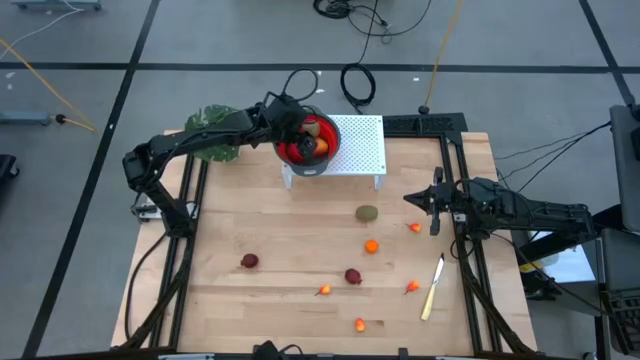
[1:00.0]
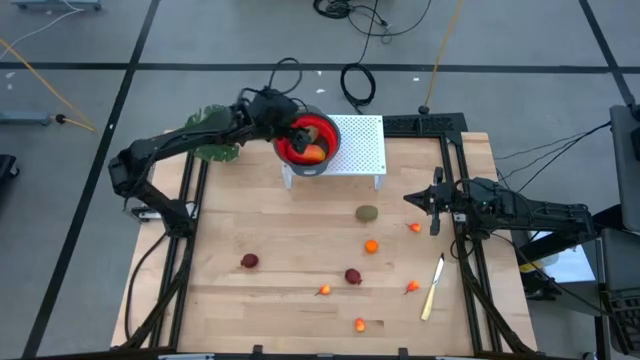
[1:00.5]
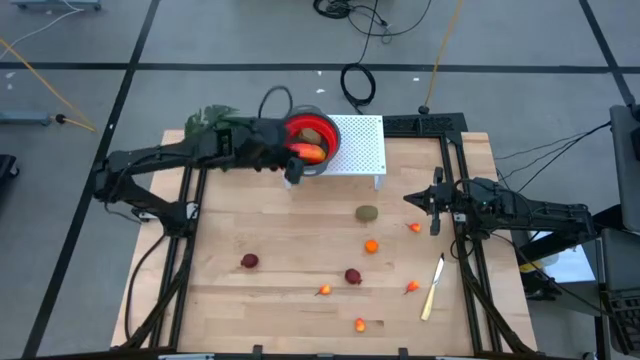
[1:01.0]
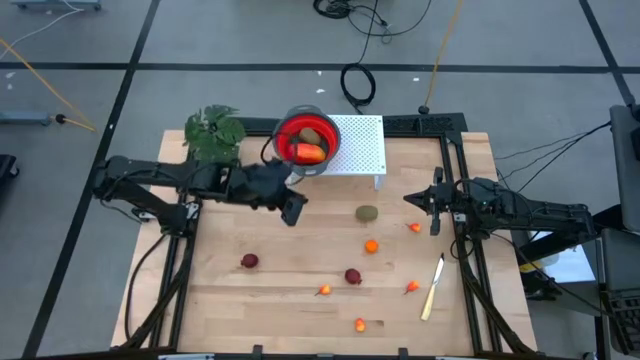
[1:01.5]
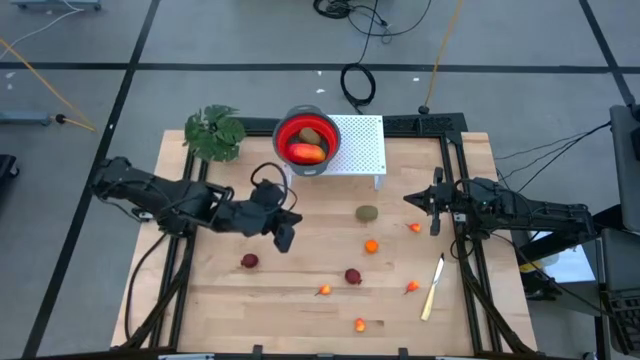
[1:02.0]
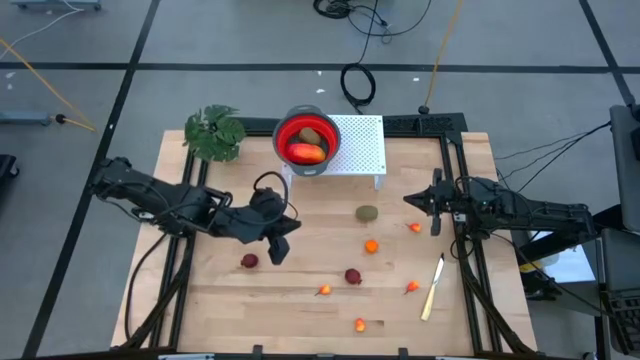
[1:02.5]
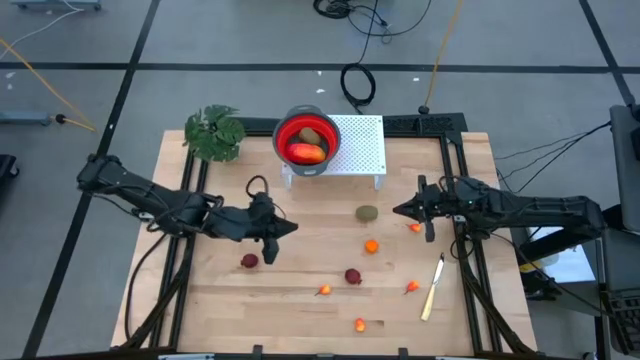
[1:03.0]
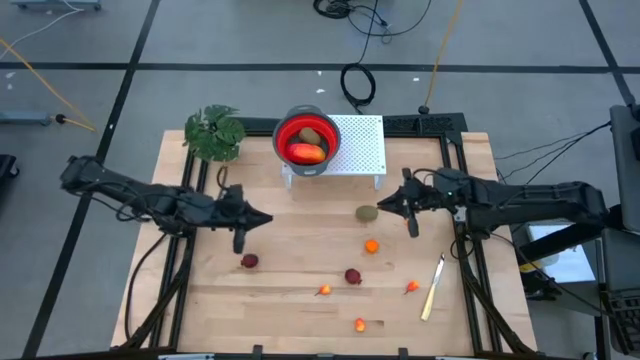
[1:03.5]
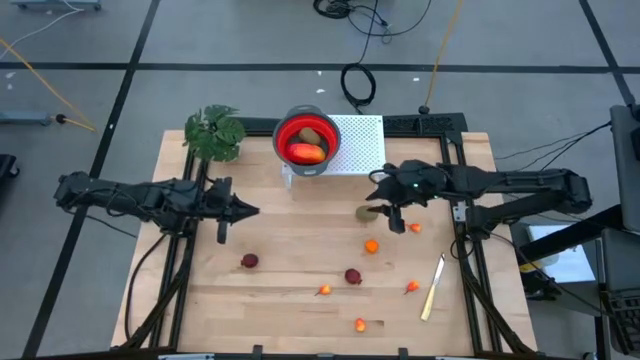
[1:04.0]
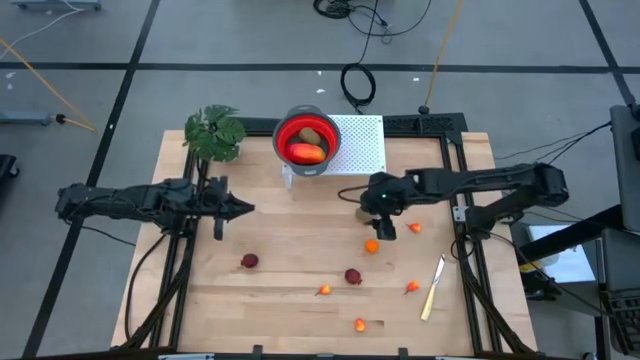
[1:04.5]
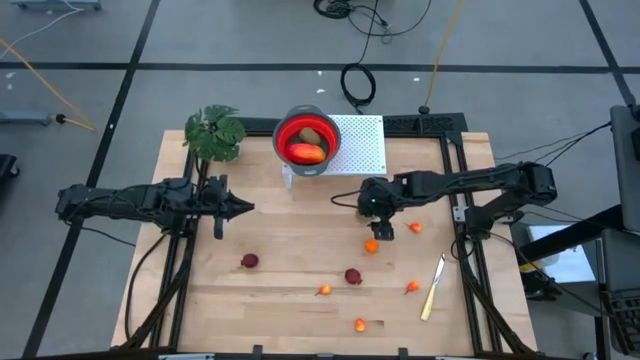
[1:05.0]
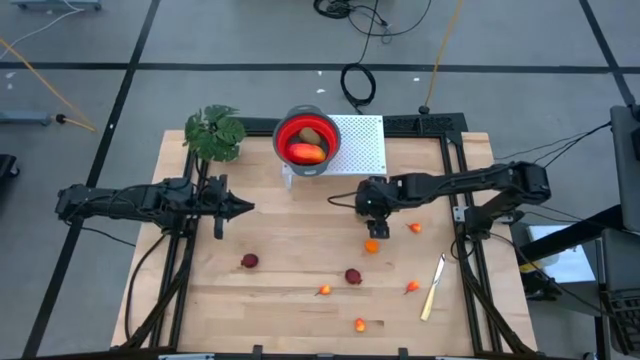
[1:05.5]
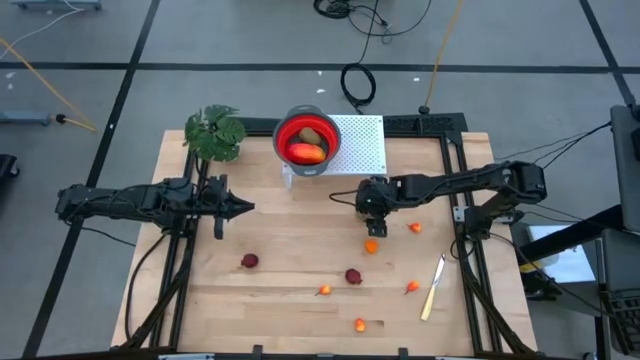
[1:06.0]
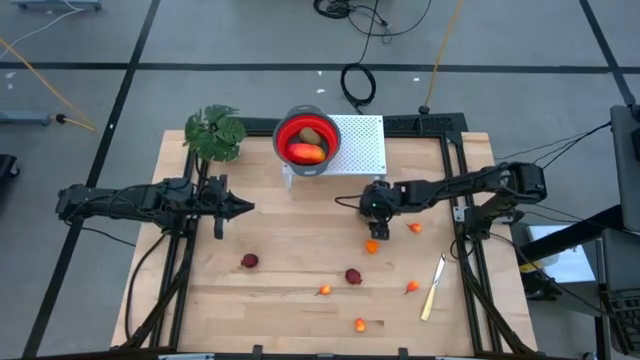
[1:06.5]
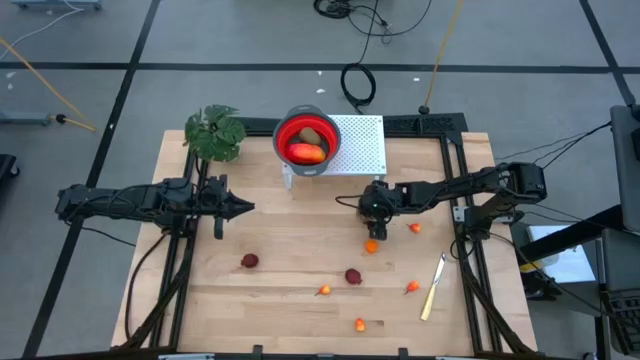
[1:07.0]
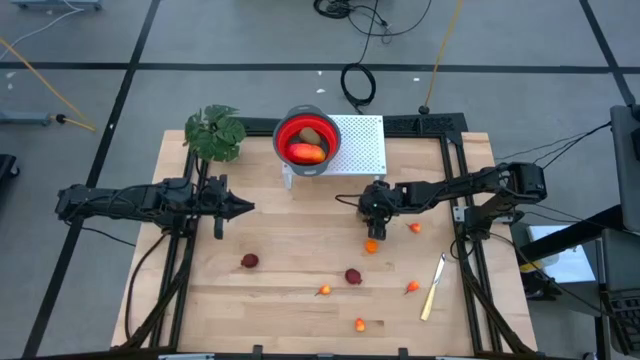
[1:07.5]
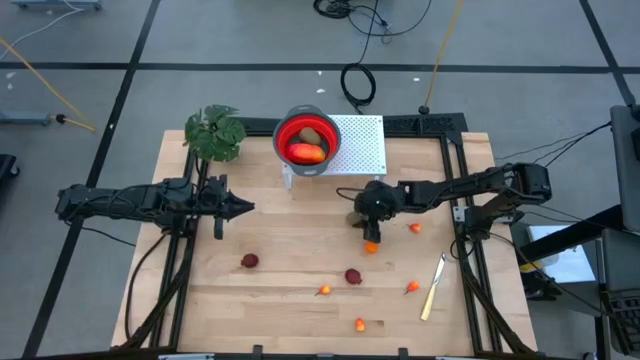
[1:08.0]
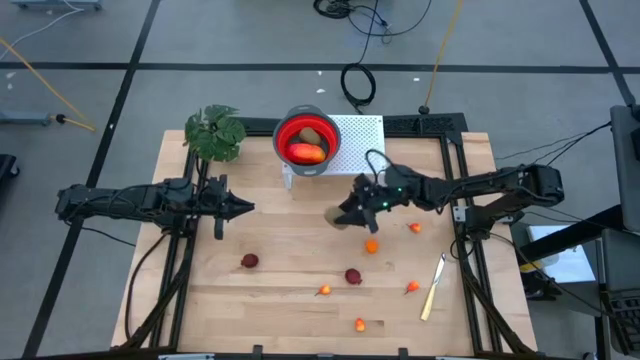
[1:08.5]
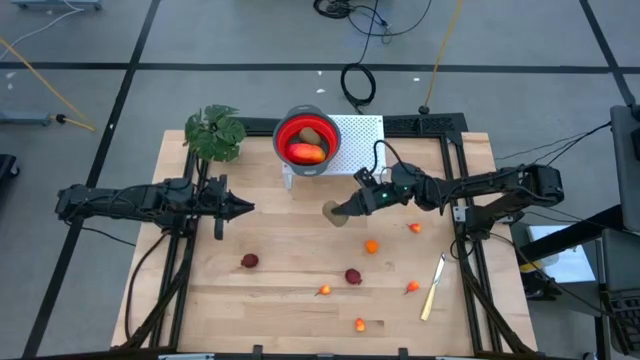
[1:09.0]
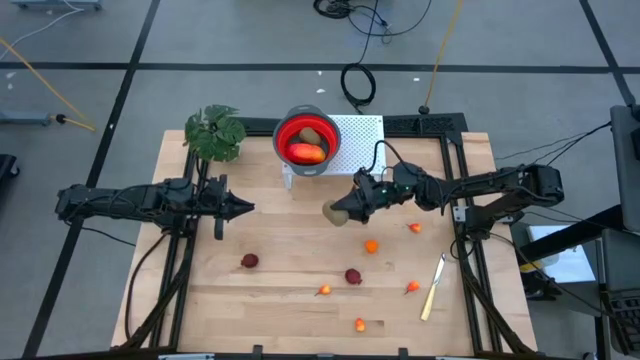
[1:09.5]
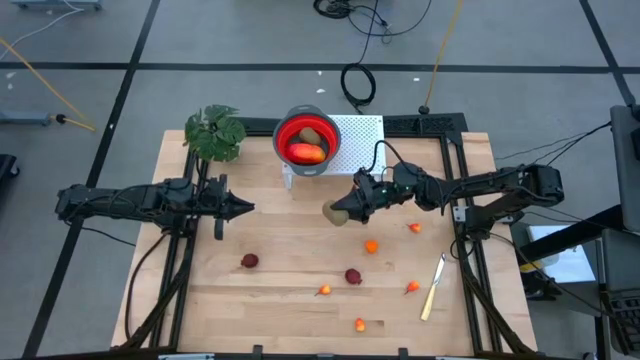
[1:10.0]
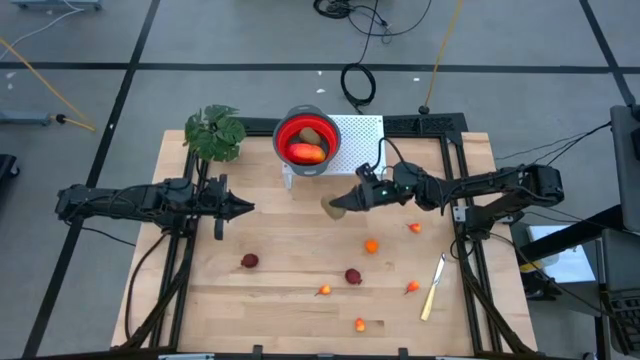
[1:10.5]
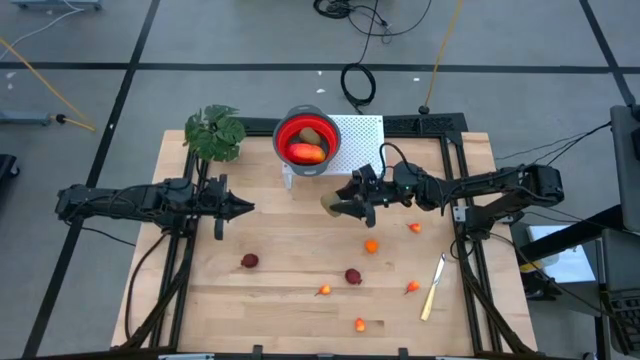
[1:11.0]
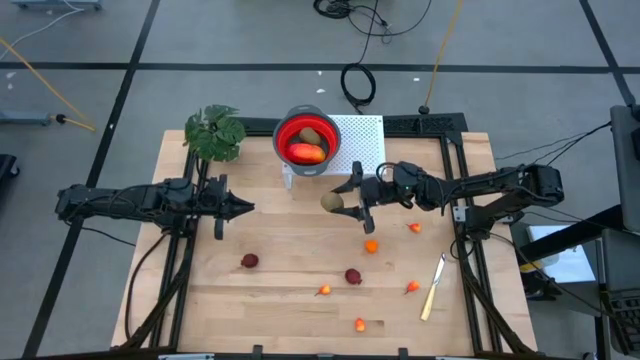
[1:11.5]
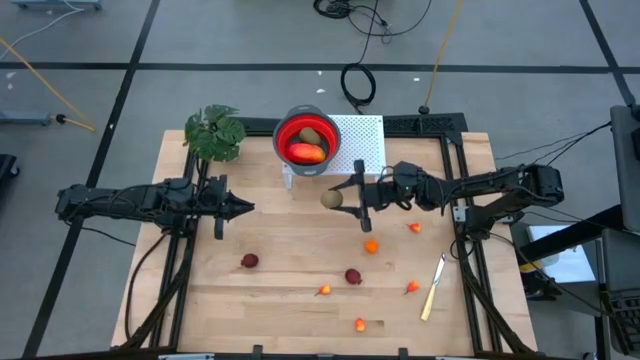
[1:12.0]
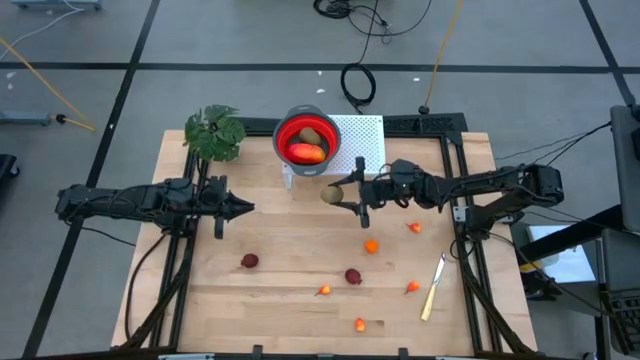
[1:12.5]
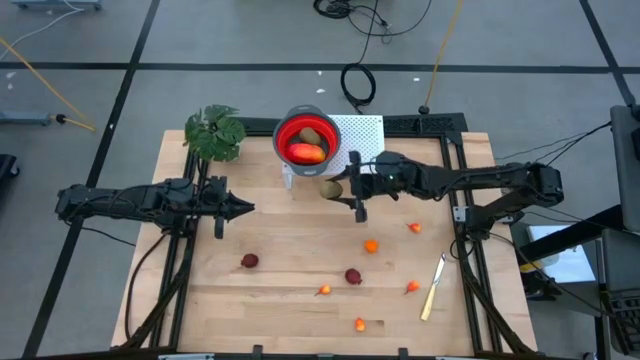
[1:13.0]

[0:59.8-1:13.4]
Task: Pick & Place Fruit
Put the kiwi into the red strainer bowl

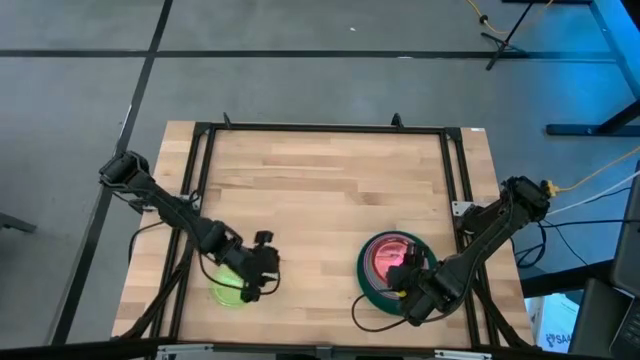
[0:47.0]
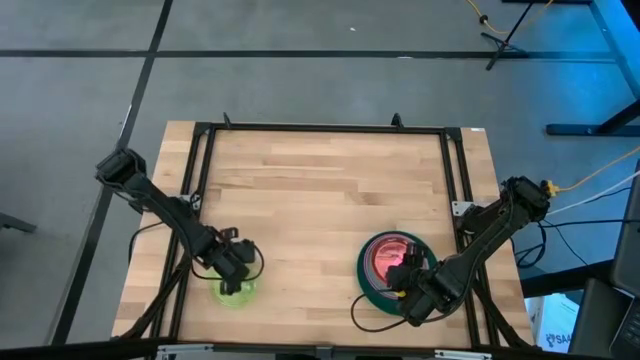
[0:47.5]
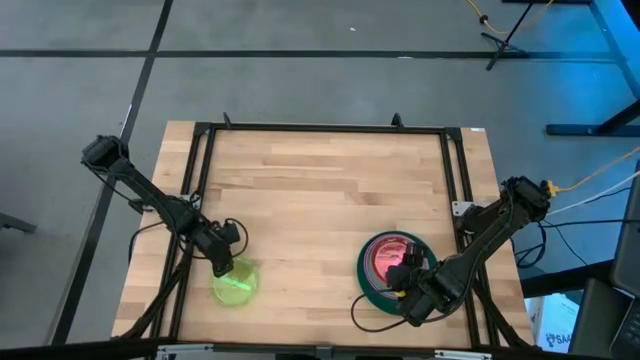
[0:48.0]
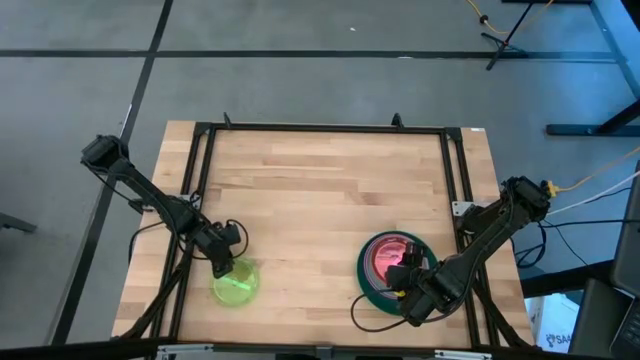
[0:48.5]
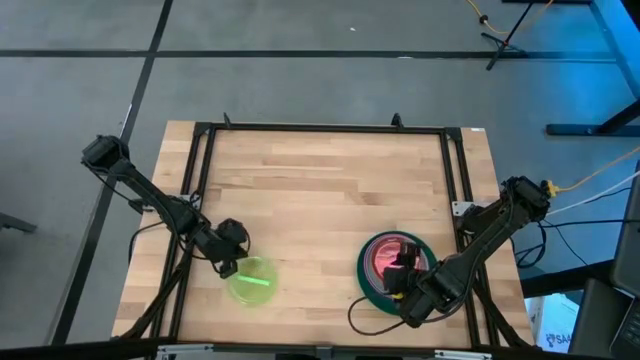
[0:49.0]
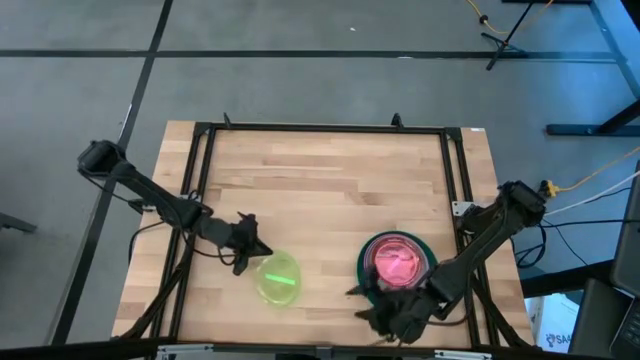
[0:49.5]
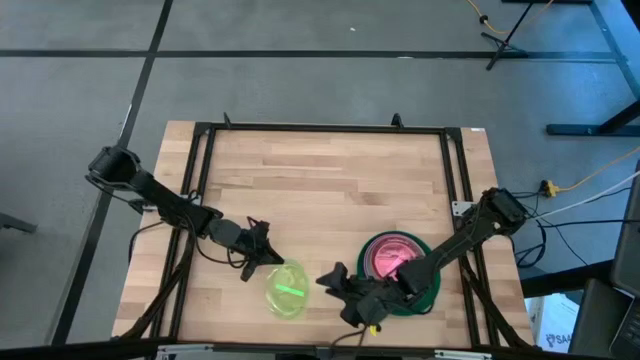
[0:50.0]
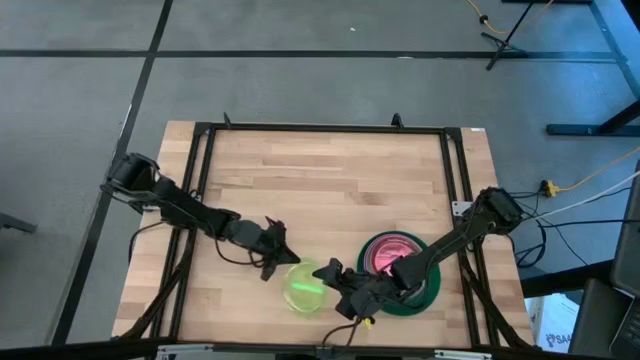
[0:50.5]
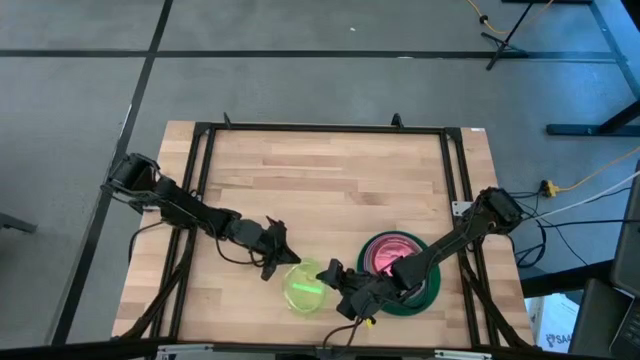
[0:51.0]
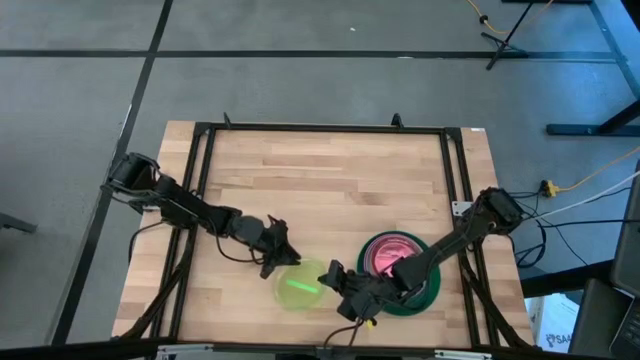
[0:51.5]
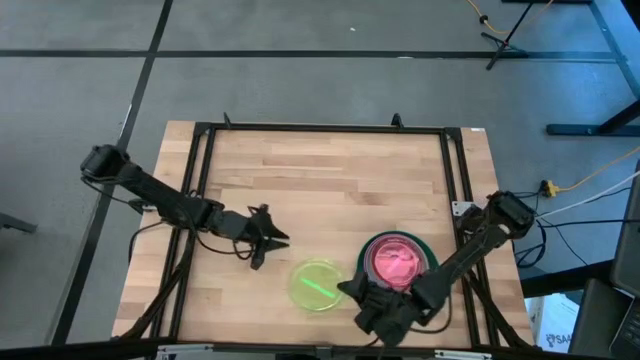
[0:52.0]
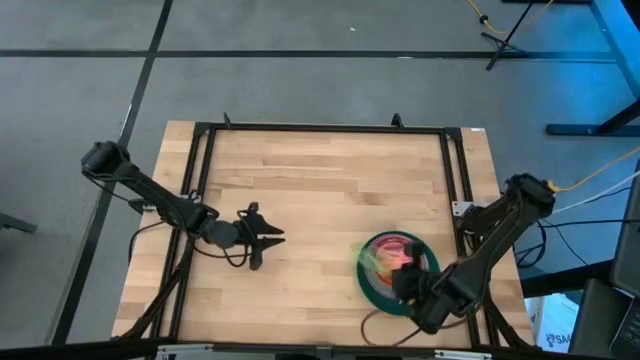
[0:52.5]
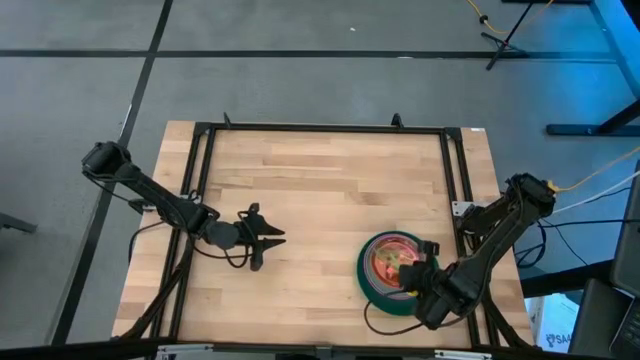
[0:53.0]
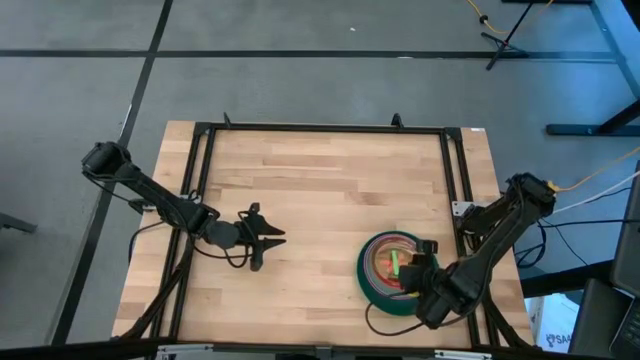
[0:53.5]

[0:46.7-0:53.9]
Task: Stack plastic plates
Stack the green plate on the light pink plate

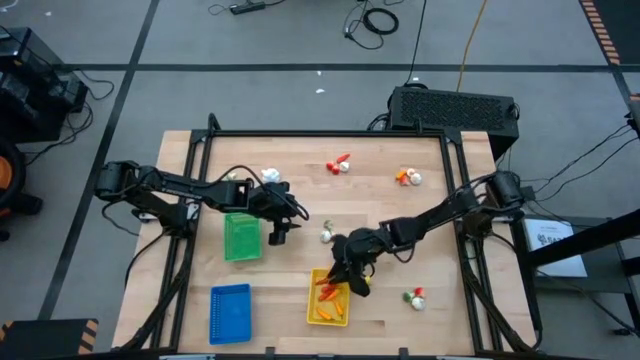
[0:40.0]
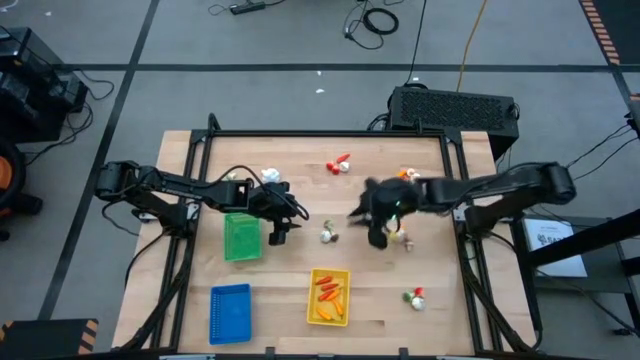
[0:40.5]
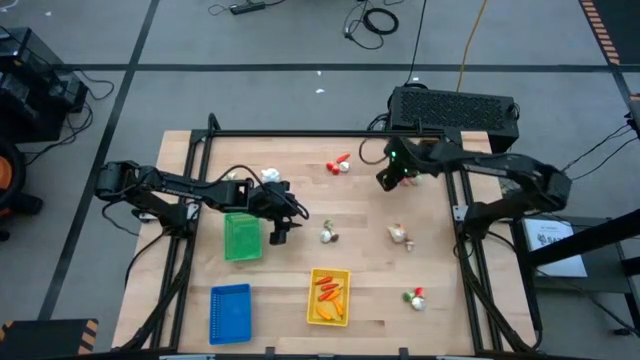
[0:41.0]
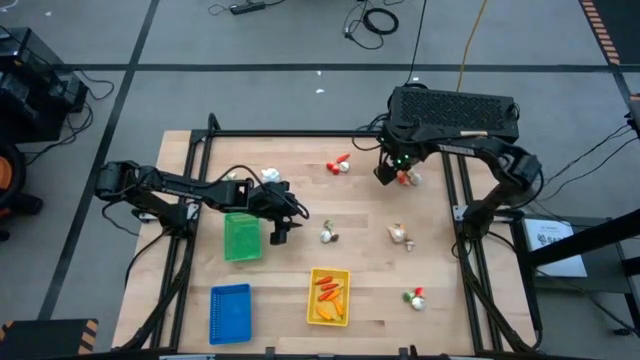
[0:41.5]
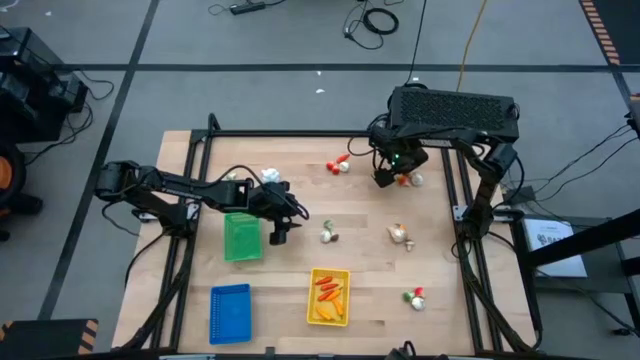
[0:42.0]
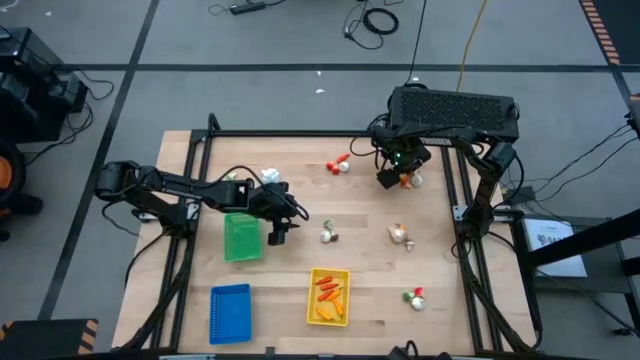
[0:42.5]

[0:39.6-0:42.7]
Task: Sort produce into baskets
Put the yellow chili pepper into the yellow basket
